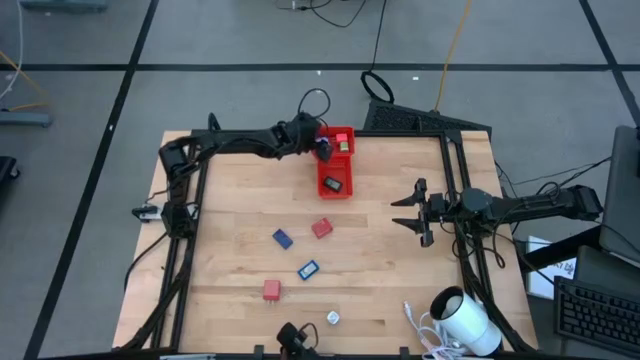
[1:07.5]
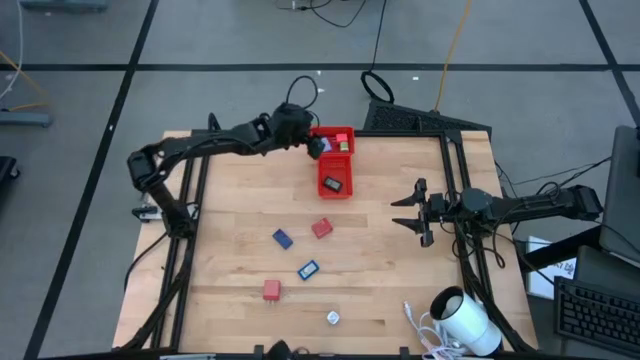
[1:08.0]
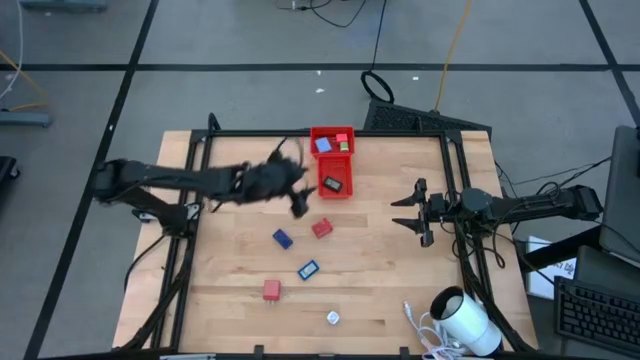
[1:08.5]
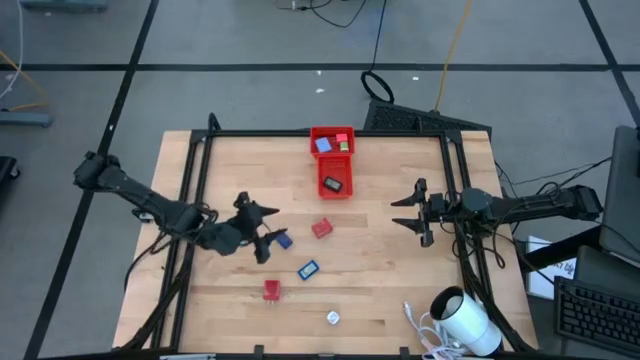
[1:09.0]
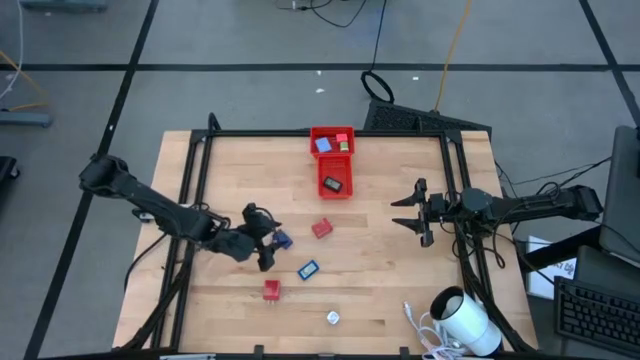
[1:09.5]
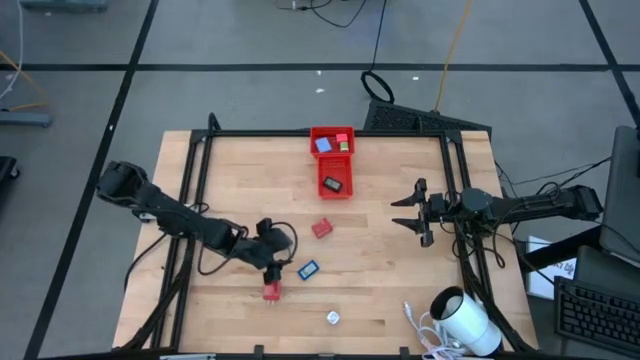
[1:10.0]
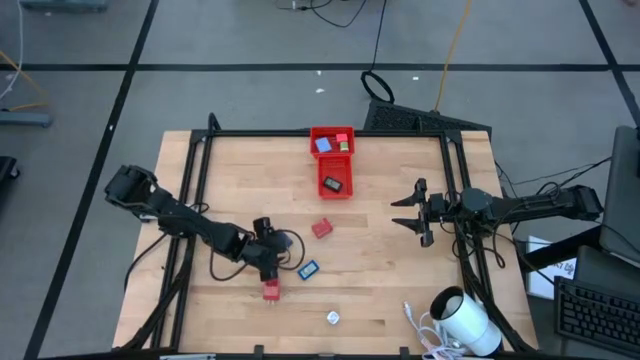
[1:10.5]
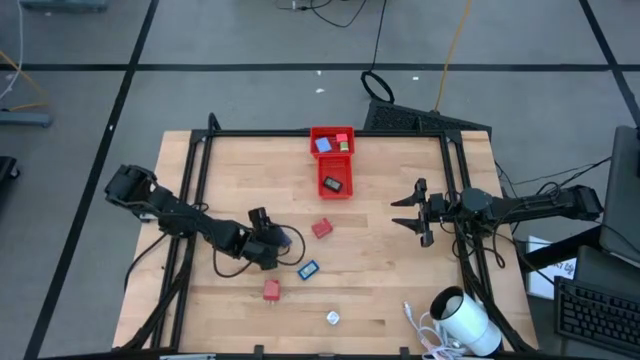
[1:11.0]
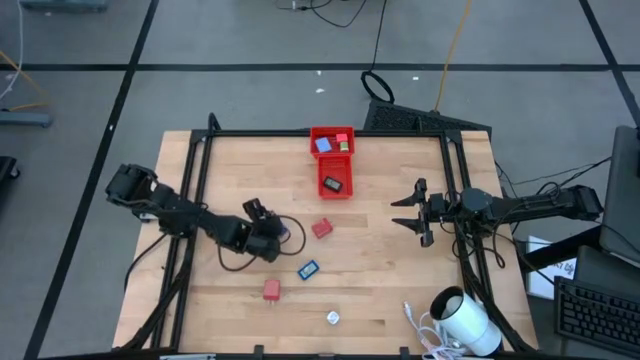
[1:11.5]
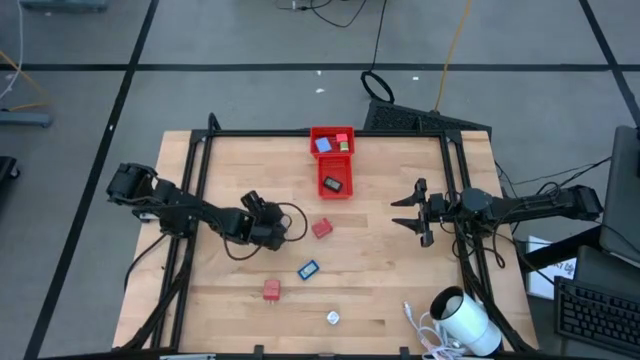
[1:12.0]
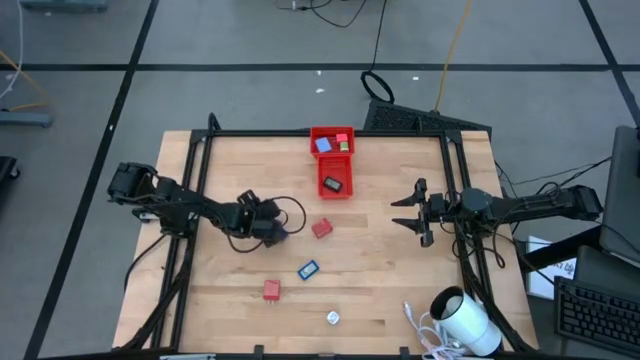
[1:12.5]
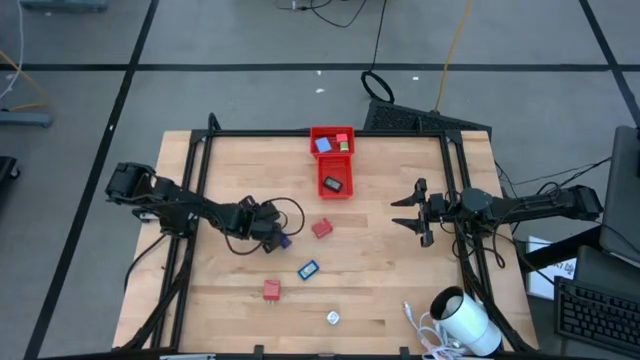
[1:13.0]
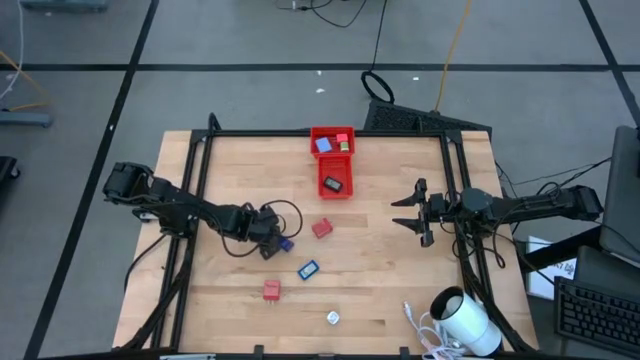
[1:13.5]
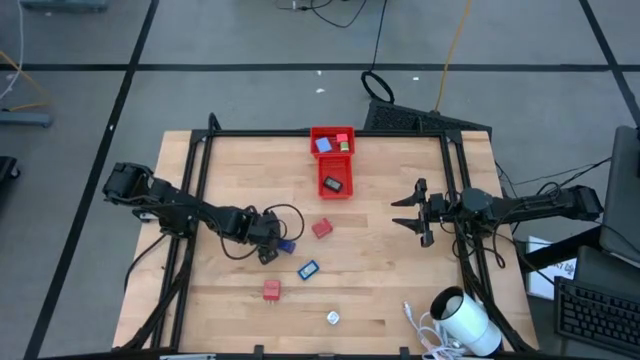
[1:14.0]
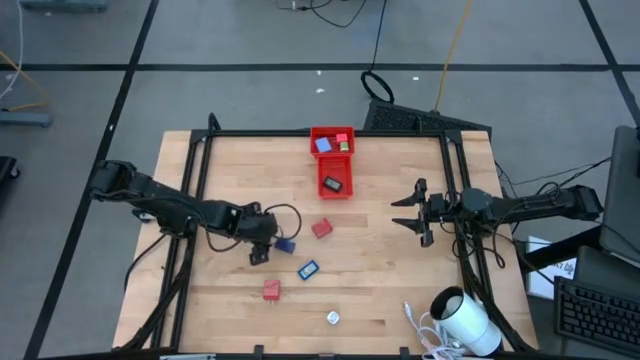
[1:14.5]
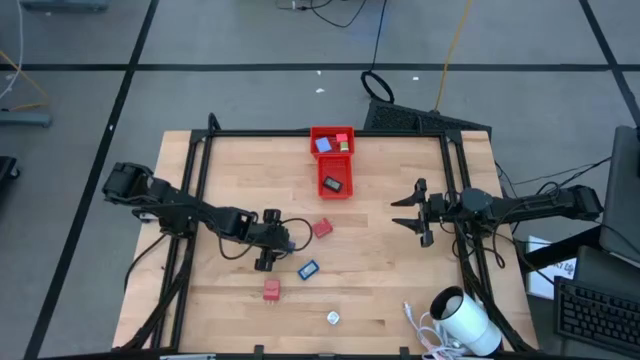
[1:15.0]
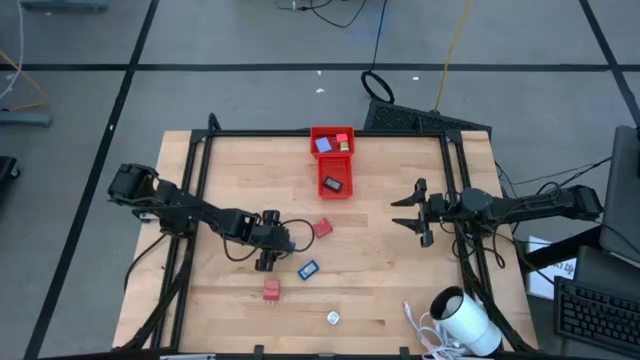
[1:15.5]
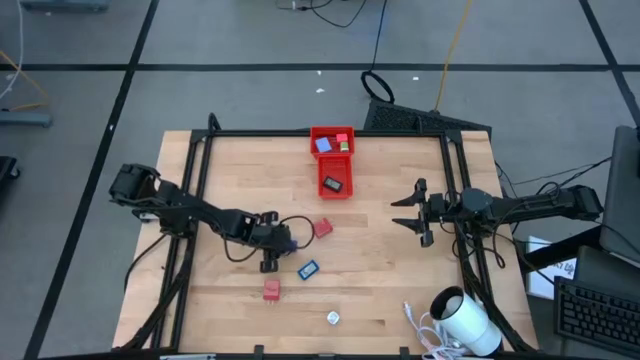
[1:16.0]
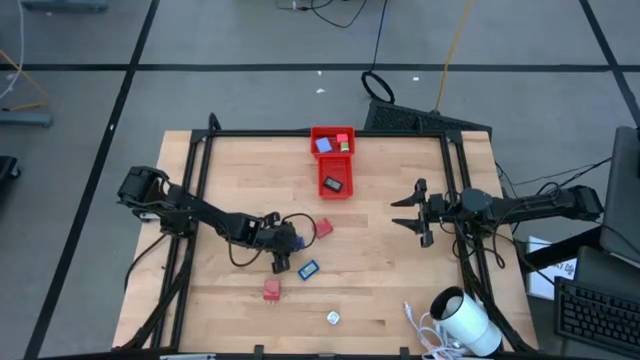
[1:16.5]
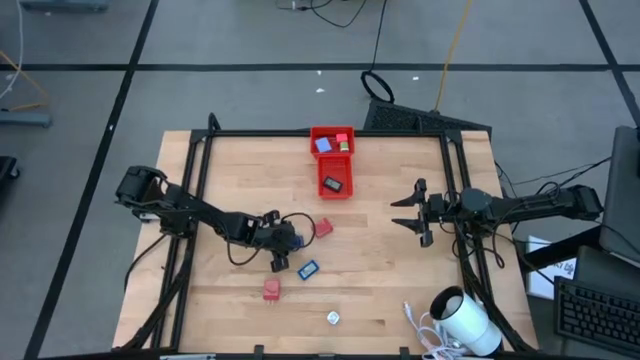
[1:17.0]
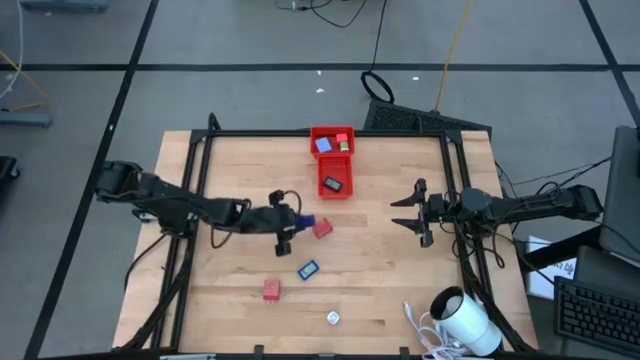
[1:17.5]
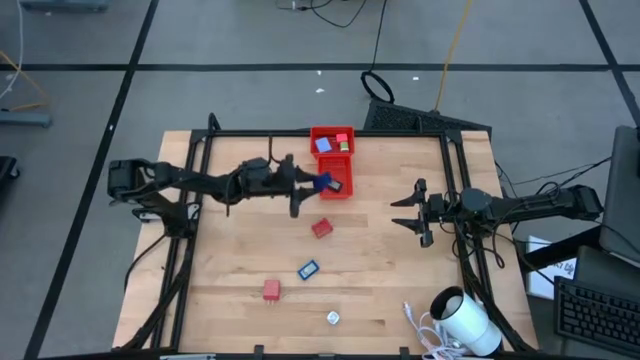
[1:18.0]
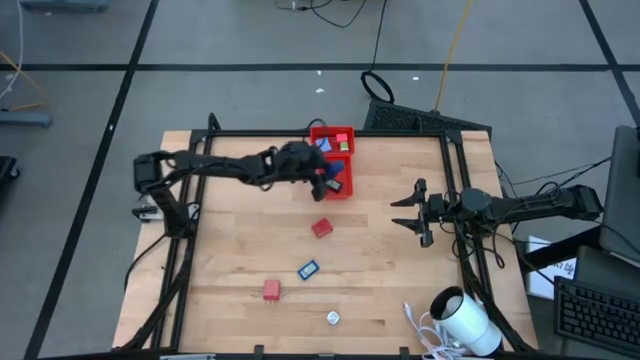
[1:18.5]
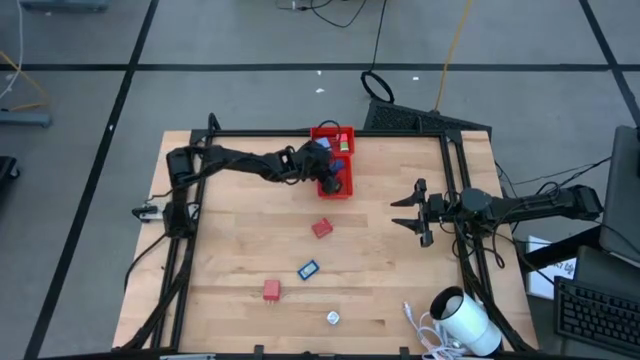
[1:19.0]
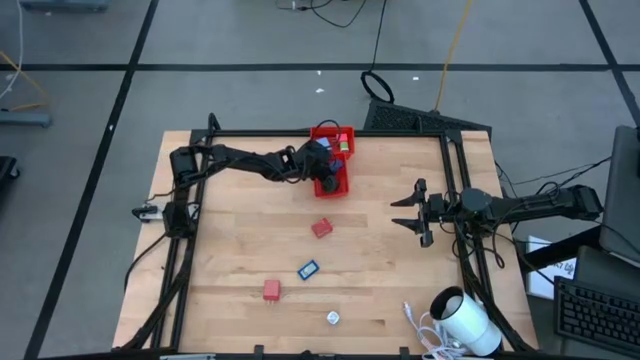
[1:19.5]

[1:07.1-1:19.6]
Task: Pick & Place Office items
Put the dark blue digital timer into the bottom red bin

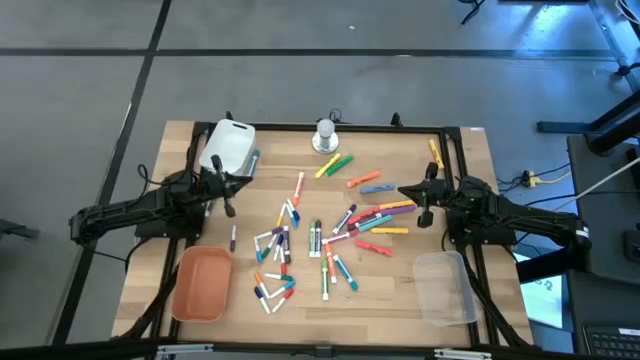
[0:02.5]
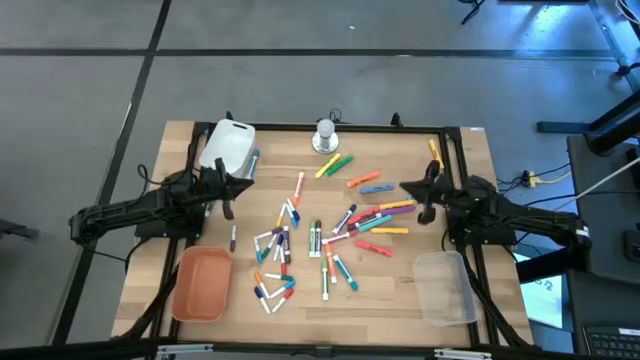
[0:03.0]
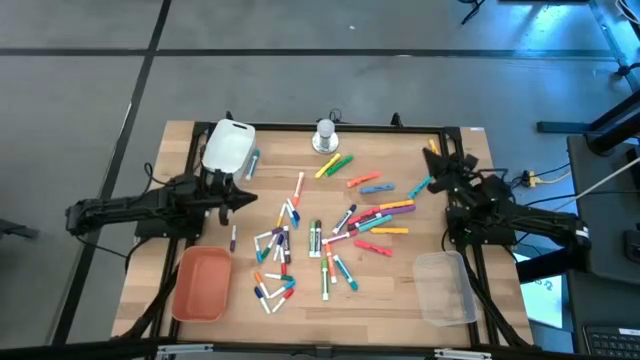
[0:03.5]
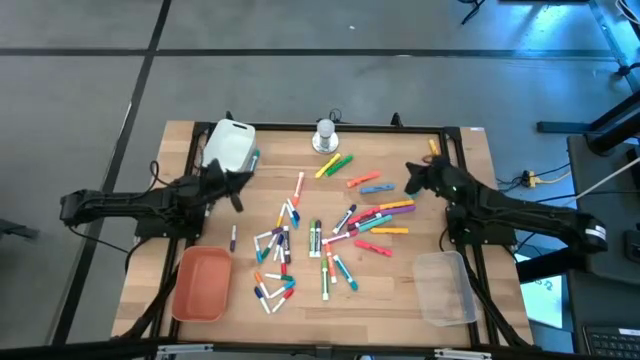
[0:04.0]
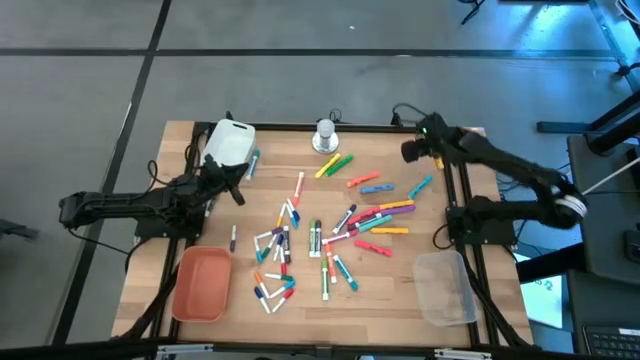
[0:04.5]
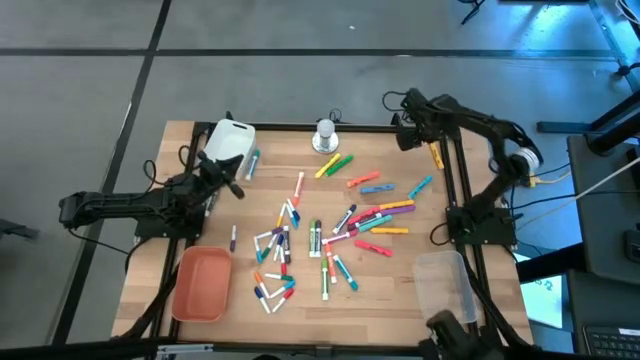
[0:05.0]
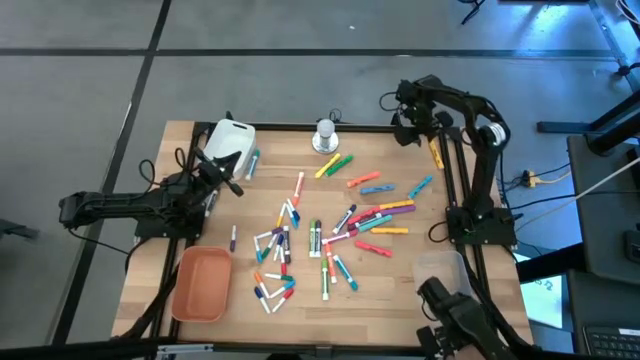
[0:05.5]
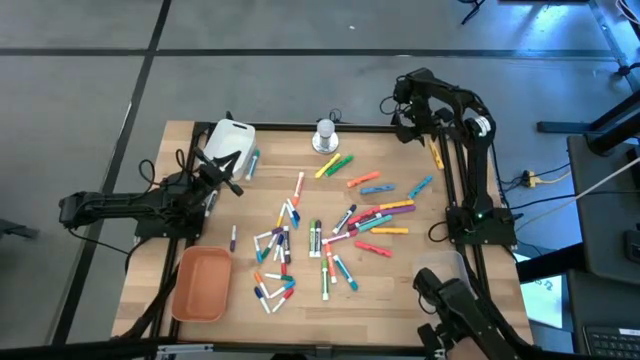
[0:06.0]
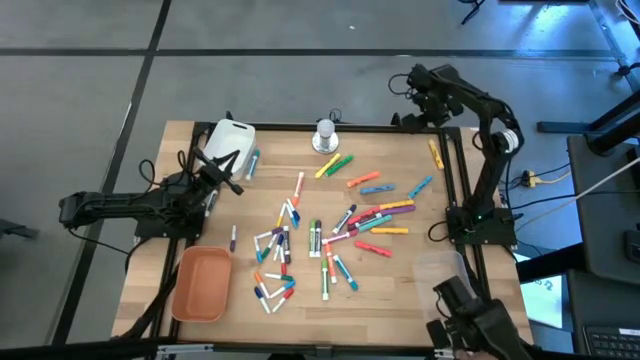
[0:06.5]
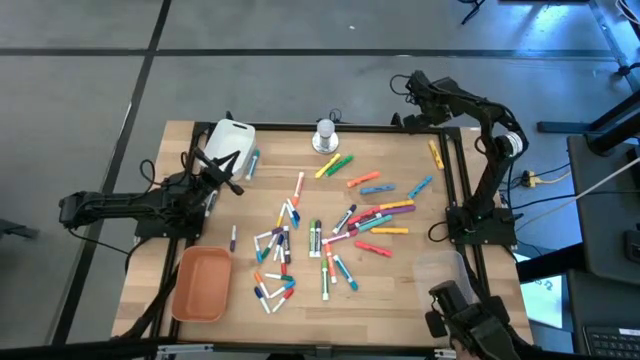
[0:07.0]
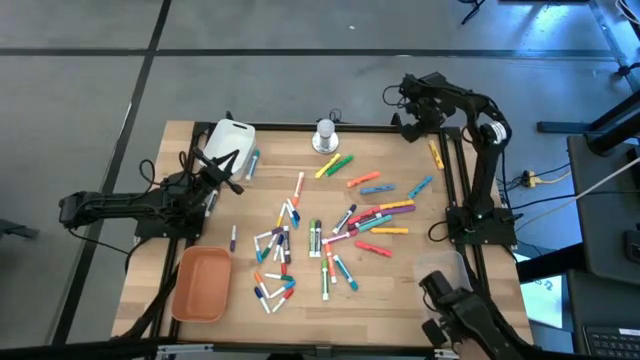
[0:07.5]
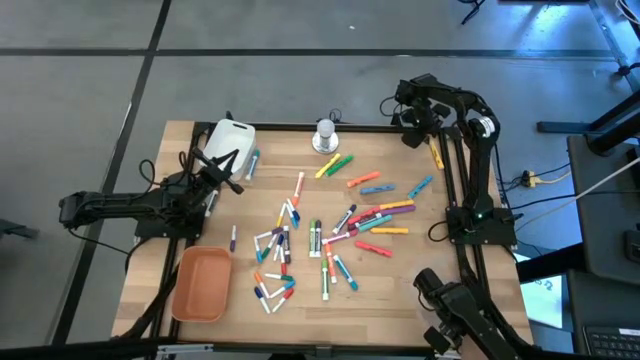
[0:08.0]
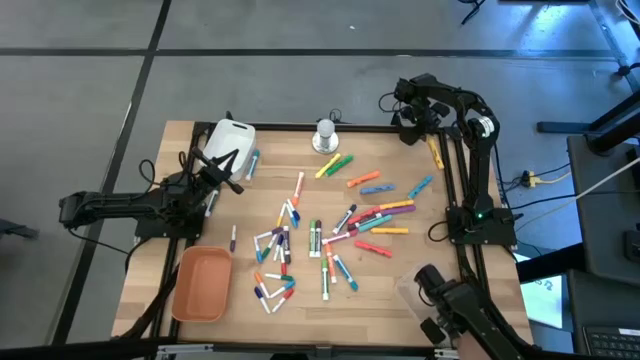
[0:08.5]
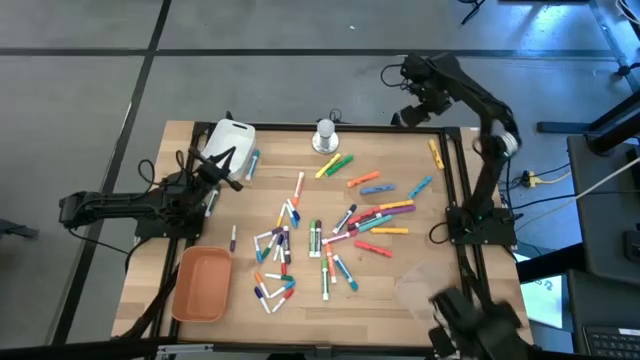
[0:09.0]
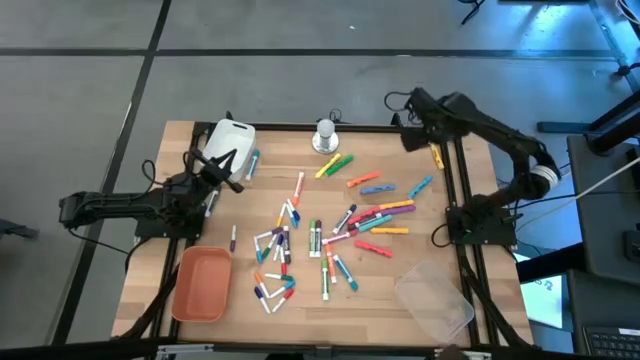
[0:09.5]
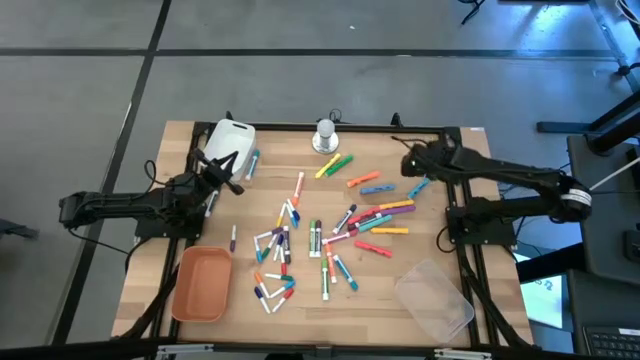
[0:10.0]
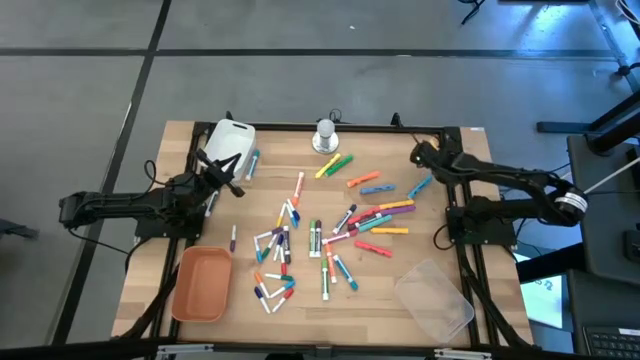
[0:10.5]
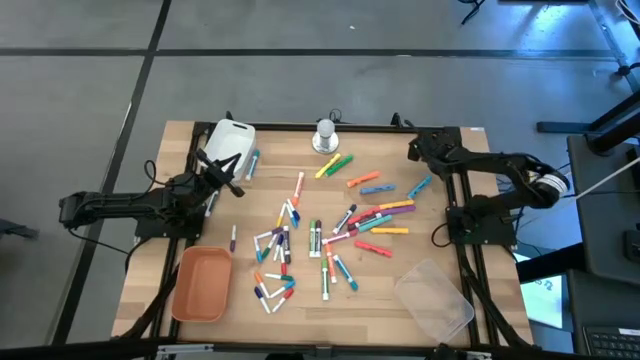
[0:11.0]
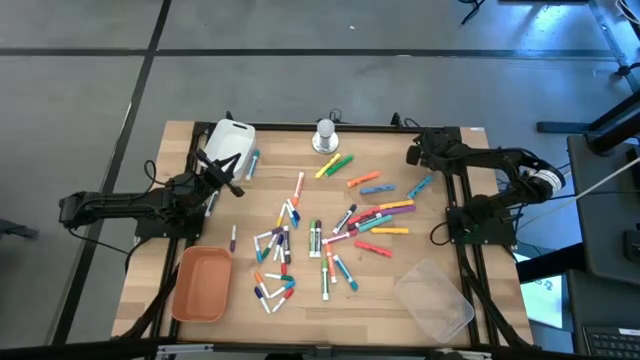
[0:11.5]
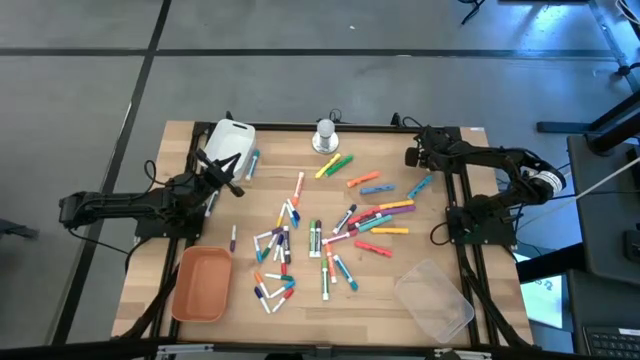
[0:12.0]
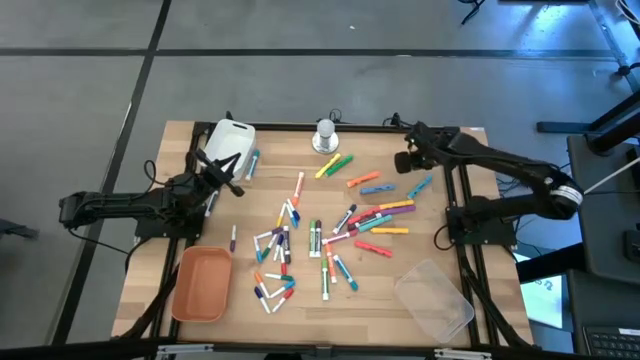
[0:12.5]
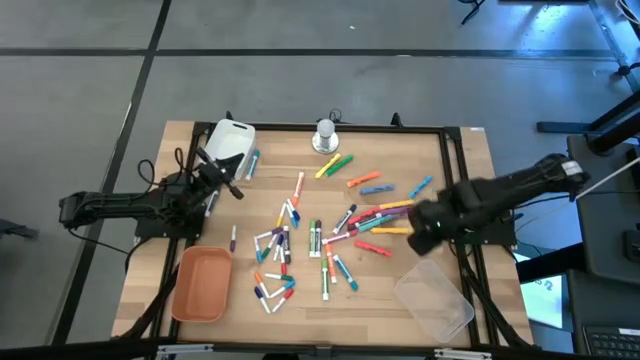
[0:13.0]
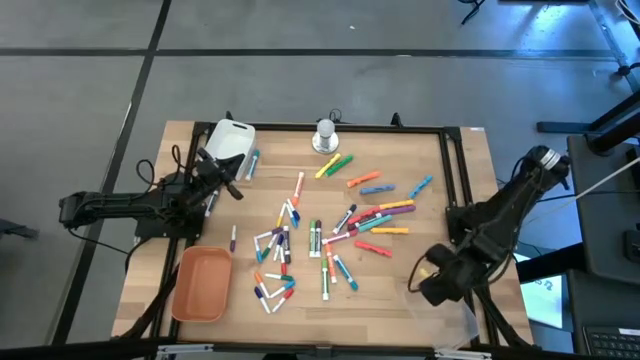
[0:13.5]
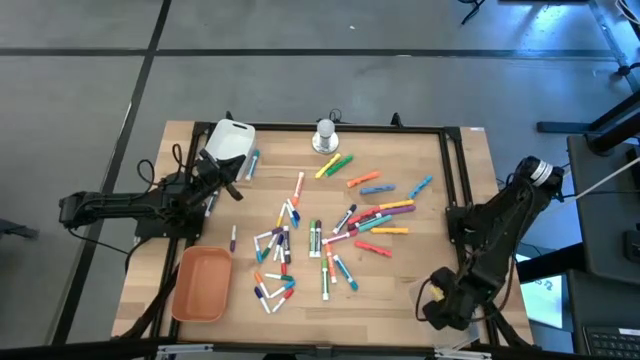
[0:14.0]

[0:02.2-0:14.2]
Task: Pick & Place Markers
Put the yellow highlighter pen into the transparent bin
